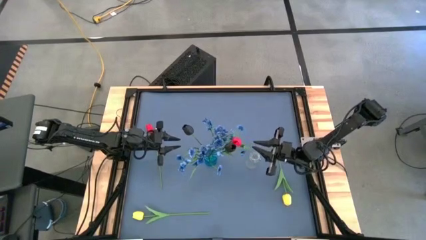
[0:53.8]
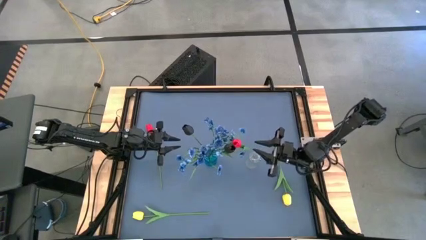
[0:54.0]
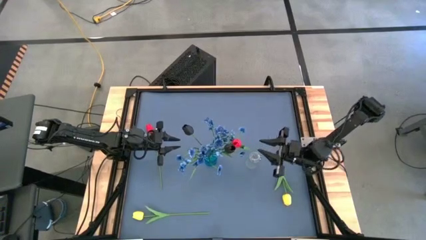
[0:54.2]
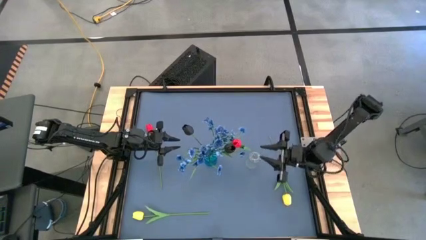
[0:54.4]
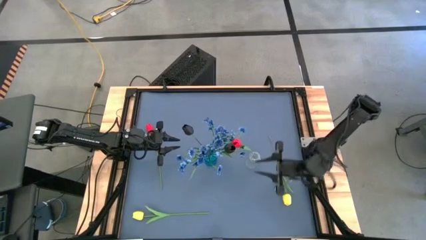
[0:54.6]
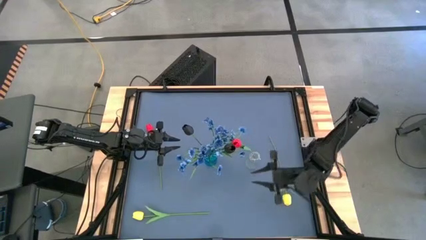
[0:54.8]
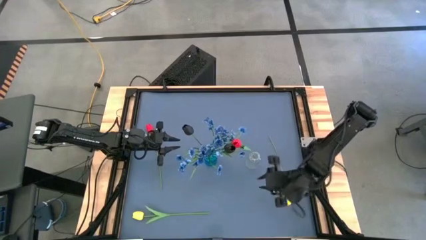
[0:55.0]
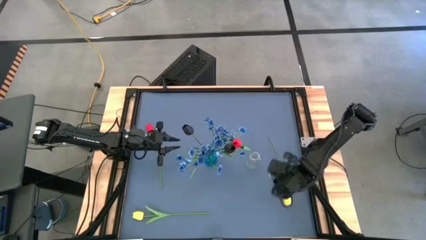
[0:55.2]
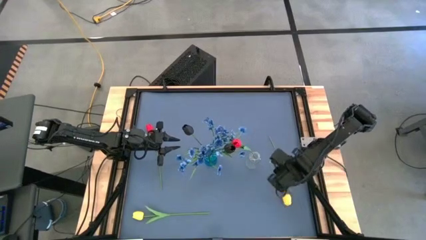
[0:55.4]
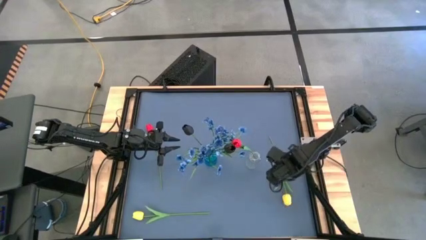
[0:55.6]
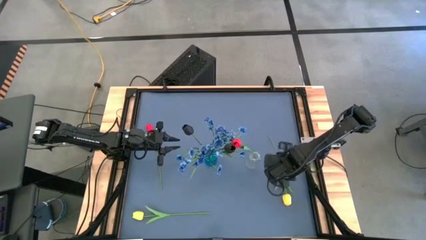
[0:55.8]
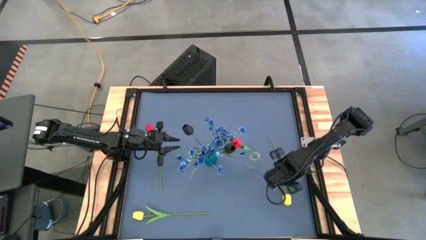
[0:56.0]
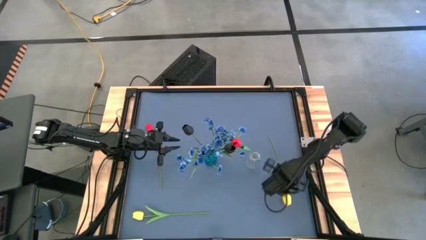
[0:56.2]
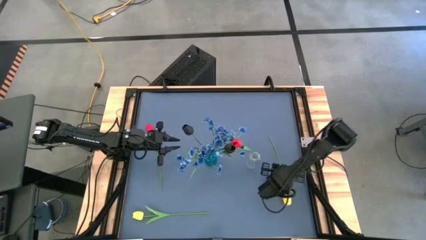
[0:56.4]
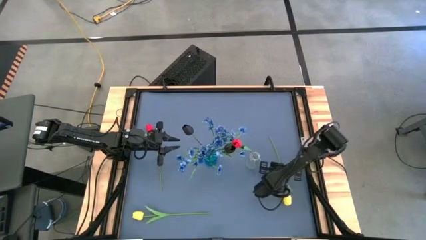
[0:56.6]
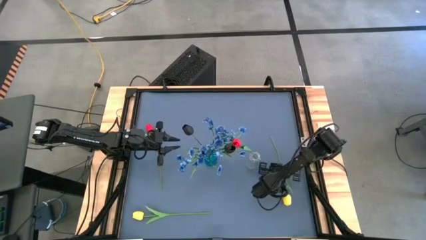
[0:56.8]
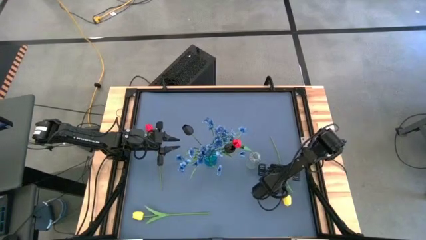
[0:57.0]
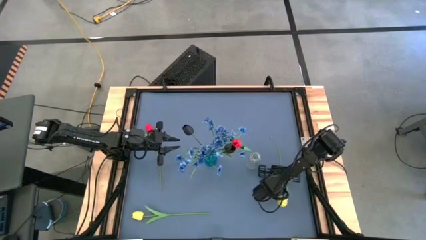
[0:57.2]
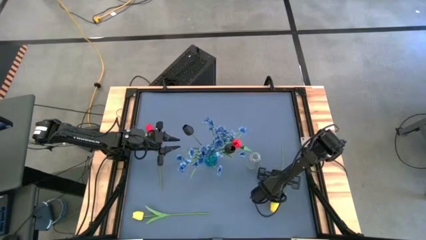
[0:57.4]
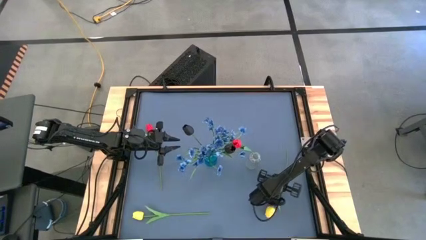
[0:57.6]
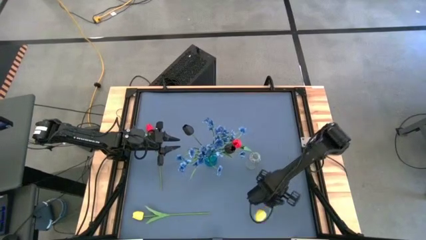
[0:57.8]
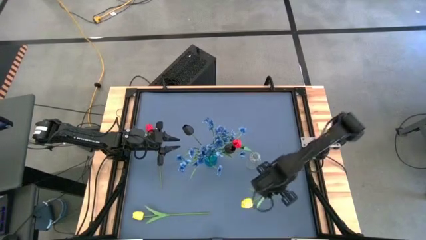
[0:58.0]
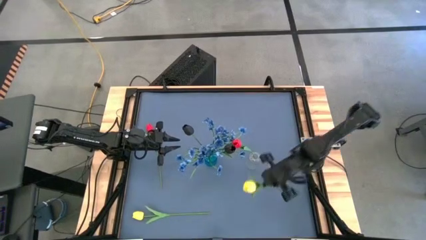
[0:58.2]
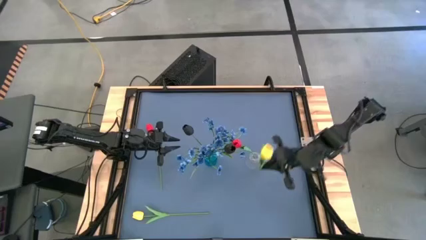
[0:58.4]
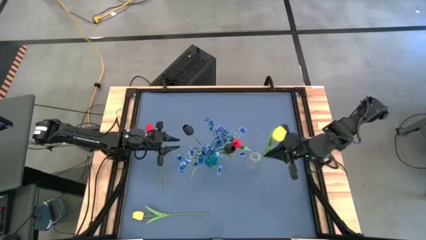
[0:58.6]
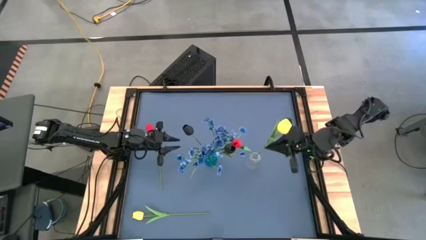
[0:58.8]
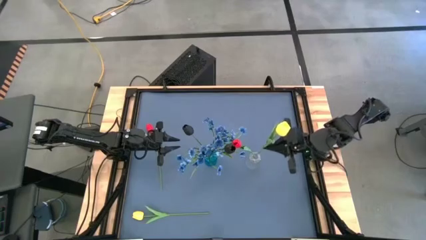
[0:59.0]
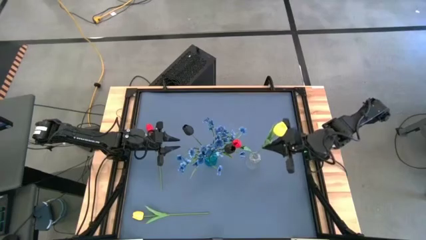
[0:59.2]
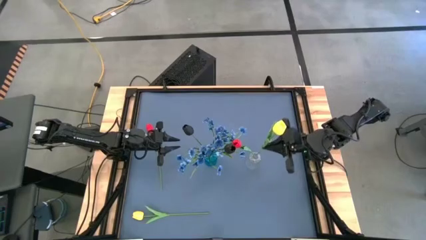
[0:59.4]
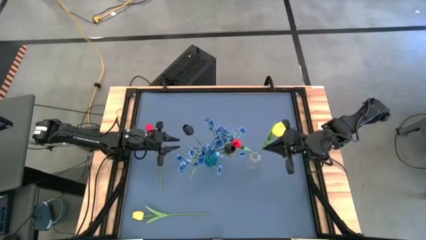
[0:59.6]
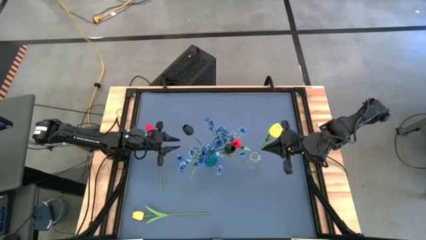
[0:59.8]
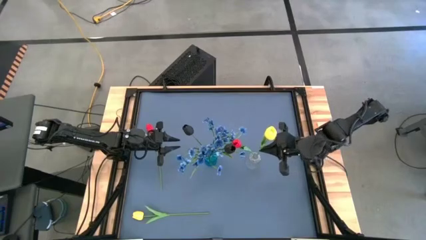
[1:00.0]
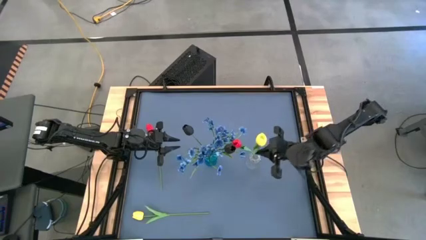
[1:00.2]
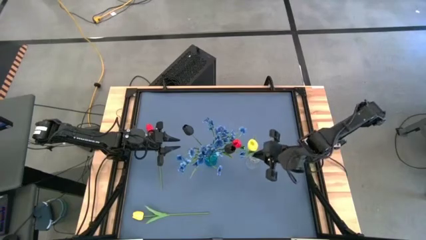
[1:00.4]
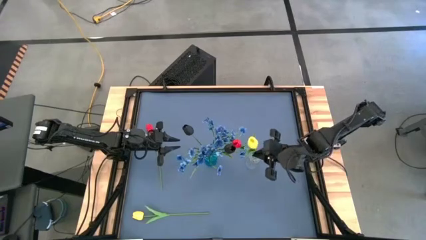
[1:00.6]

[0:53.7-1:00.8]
Task: Sort flowers into vase by color
Put the right yellow flower into the transparent flower vase

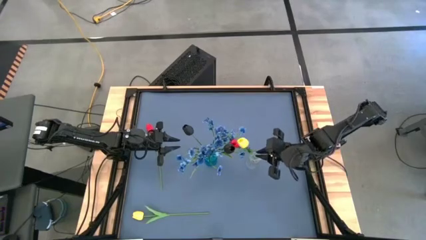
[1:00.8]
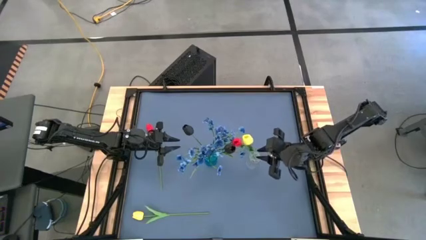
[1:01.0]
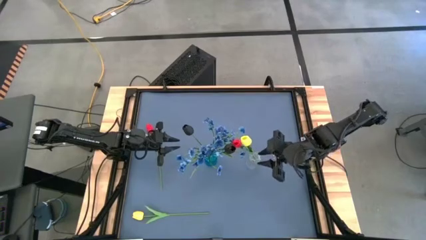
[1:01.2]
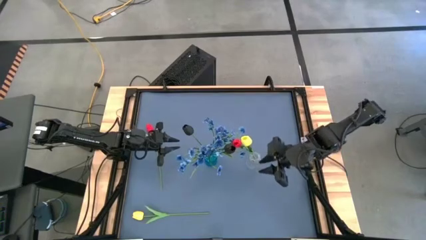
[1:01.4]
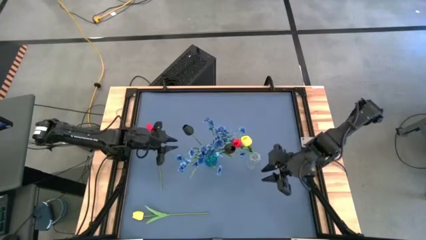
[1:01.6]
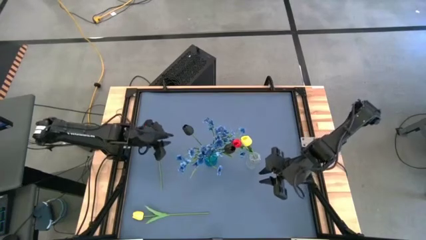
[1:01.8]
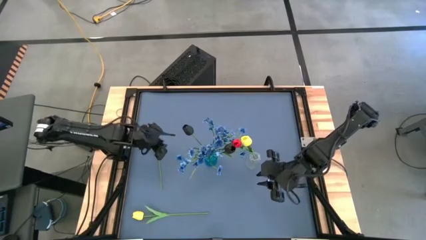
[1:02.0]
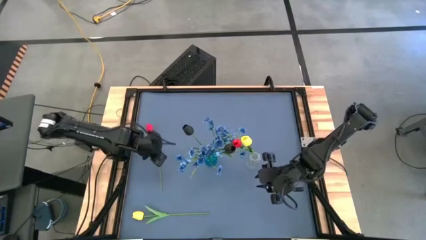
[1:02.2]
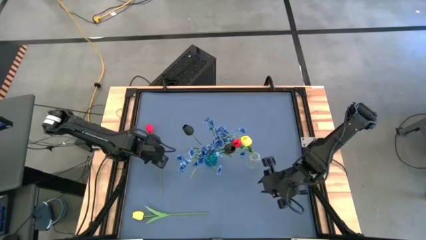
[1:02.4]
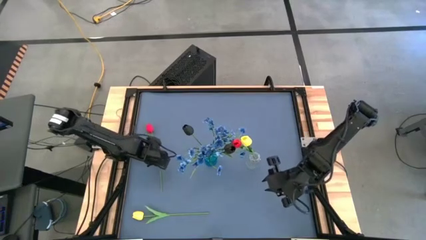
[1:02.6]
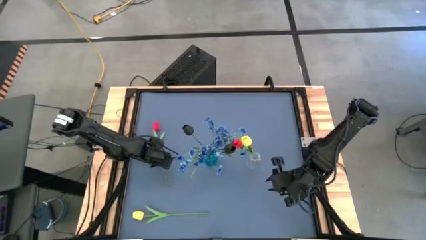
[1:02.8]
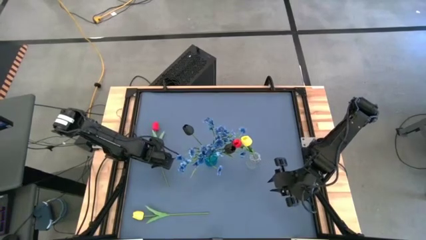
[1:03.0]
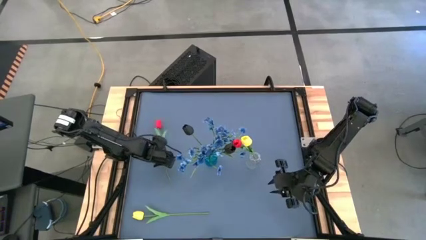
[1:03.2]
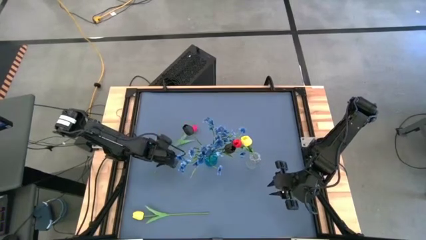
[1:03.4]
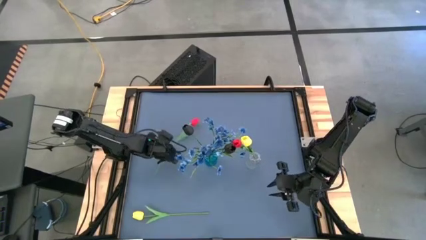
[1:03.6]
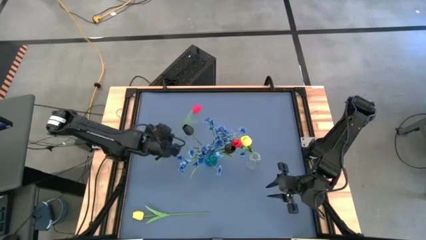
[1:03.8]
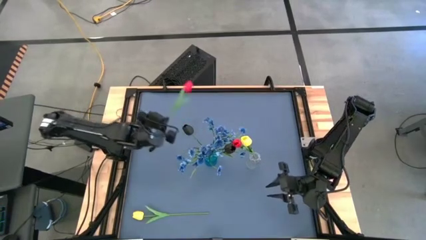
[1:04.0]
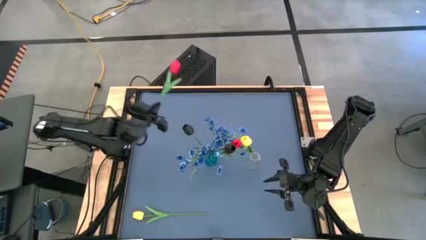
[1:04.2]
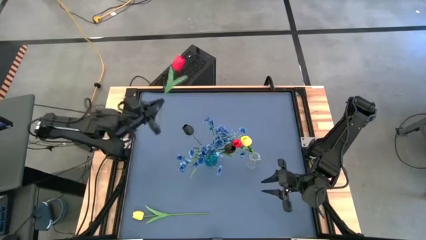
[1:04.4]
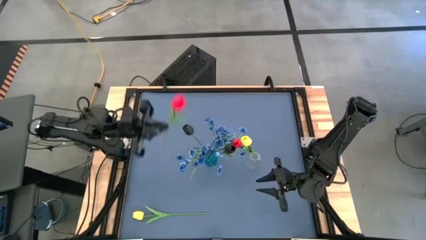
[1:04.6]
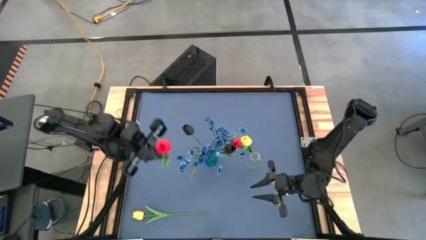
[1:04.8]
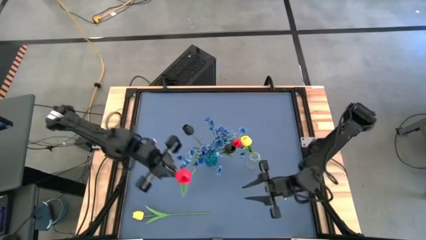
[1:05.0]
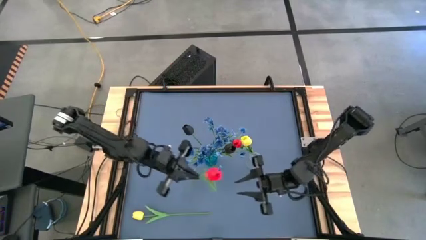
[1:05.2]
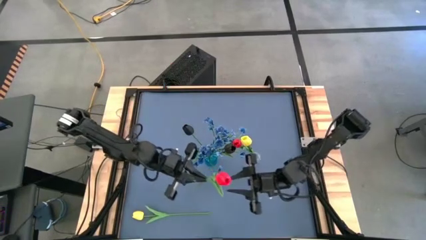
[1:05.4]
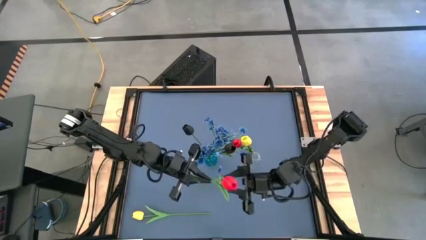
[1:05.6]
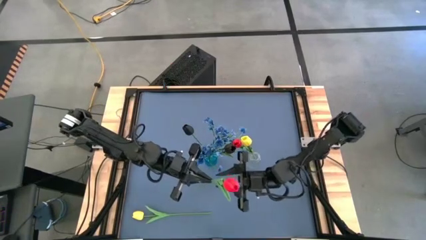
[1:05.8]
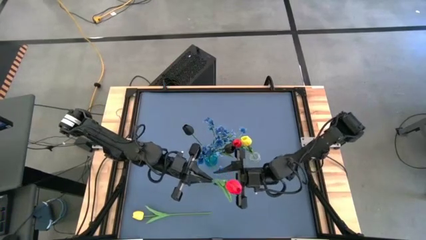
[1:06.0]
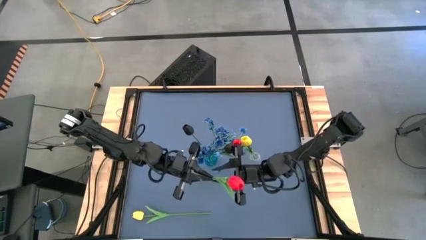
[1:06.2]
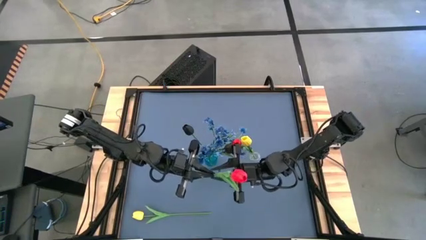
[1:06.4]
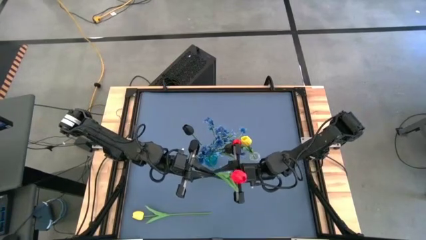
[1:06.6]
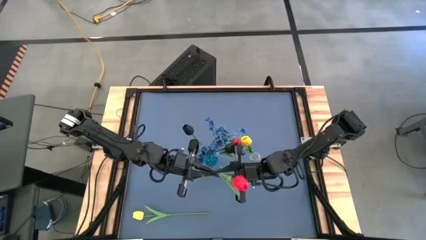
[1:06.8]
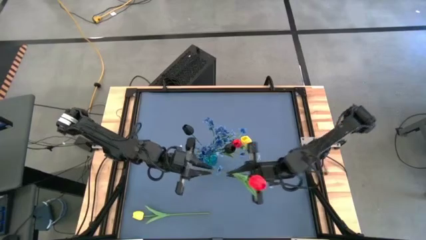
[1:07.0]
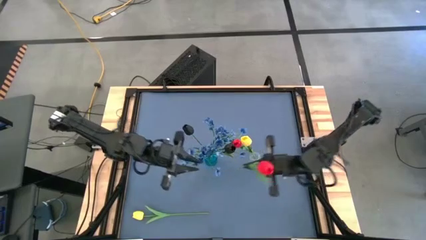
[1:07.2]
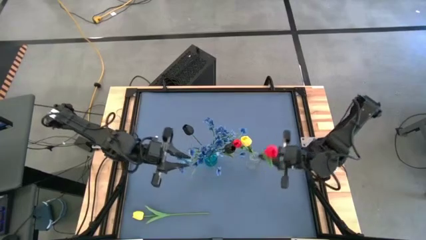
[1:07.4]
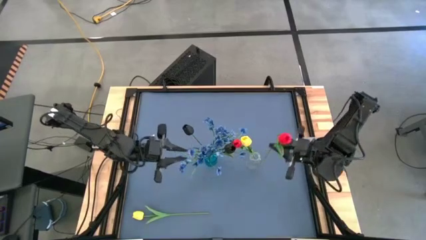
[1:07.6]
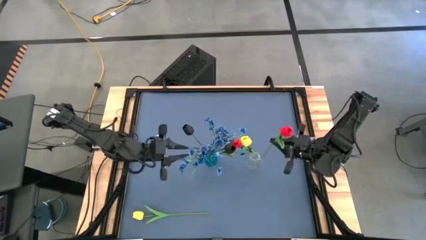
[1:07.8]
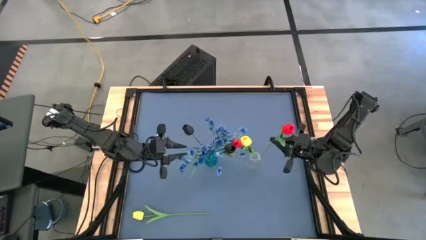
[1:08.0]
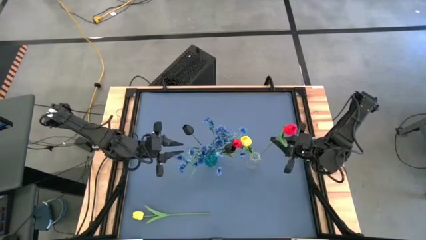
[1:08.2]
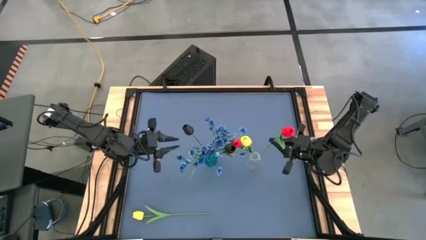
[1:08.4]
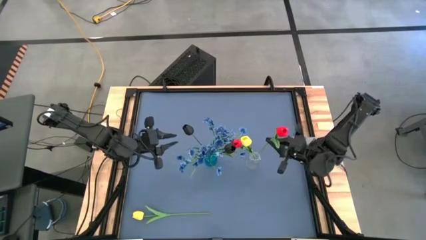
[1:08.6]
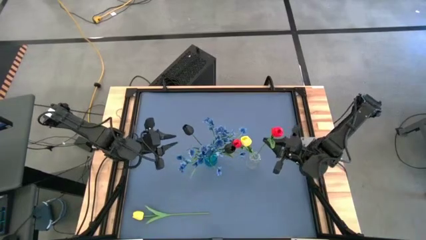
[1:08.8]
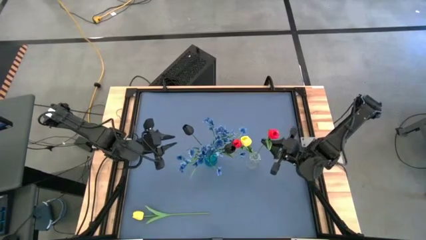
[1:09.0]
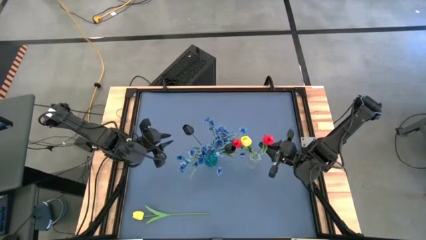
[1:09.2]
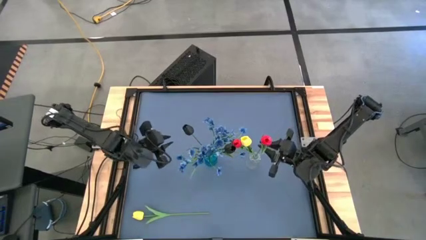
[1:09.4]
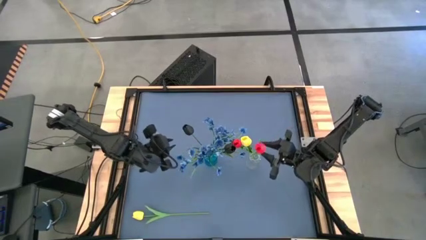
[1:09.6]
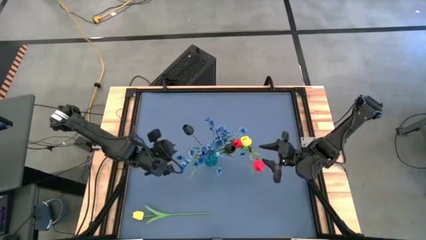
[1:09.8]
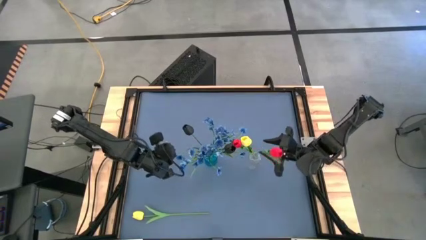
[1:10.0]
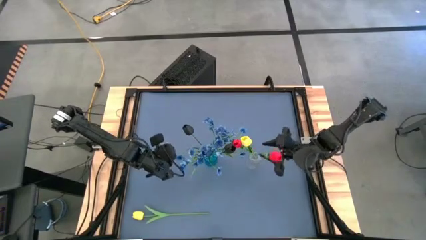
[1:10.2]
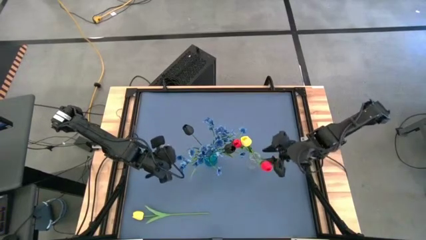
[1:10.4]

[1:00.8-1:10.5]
Put the red flower into the transparent flower vase
